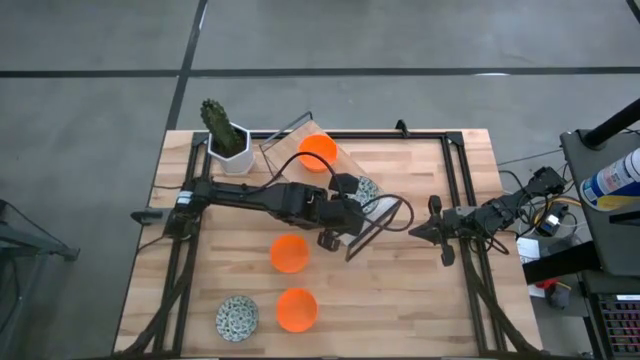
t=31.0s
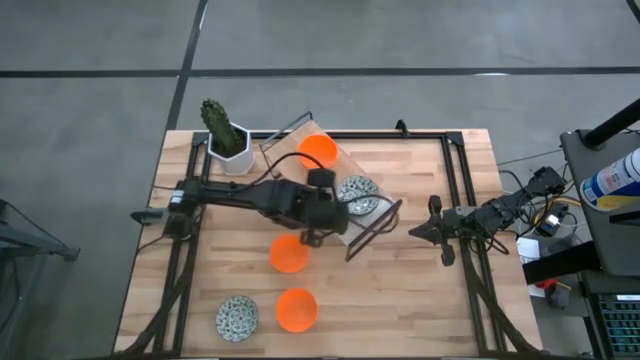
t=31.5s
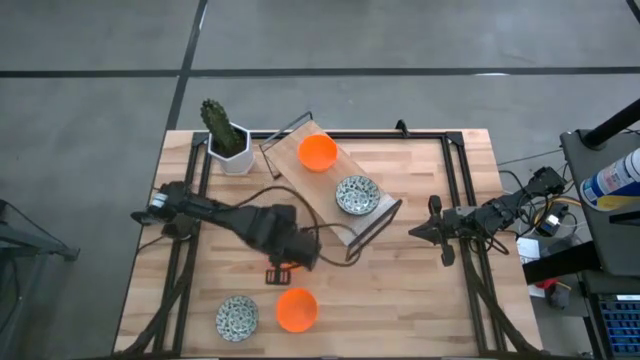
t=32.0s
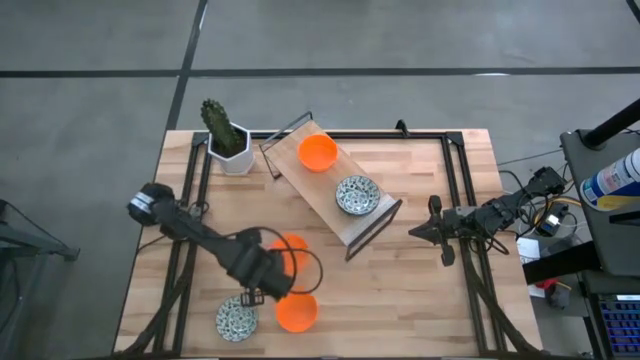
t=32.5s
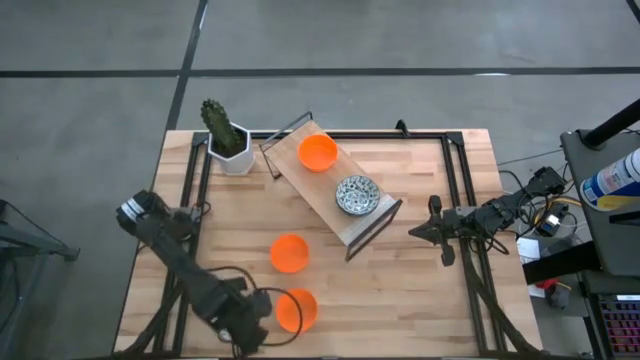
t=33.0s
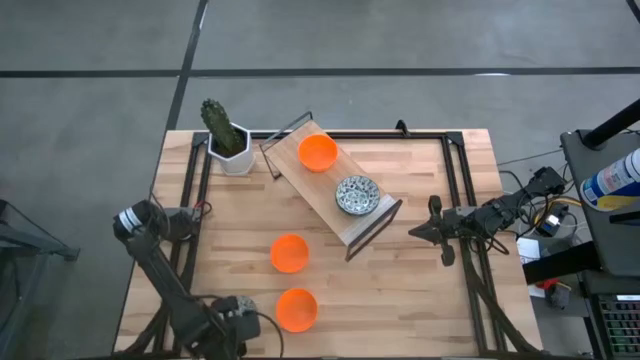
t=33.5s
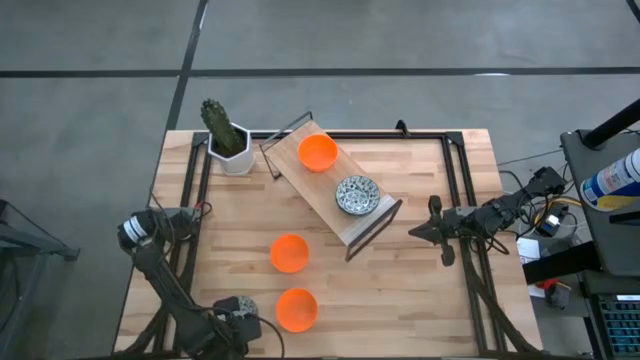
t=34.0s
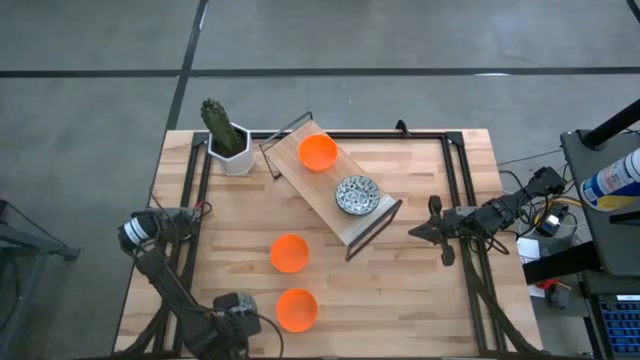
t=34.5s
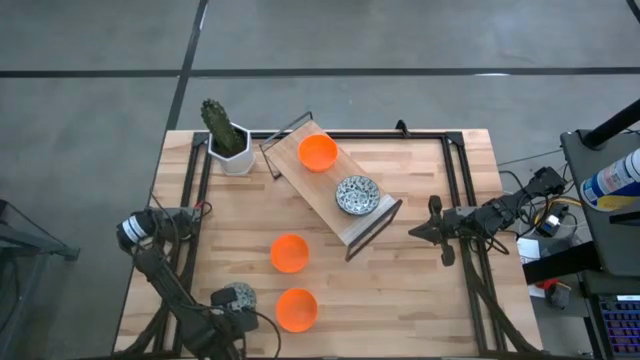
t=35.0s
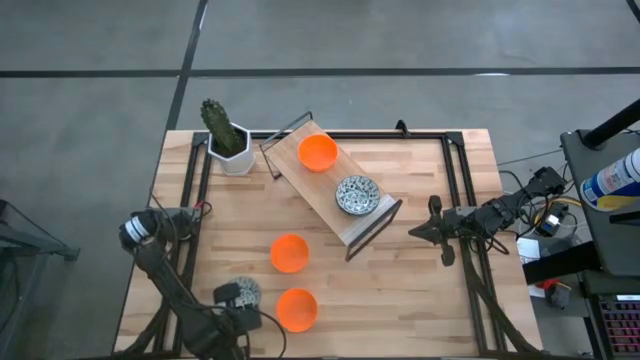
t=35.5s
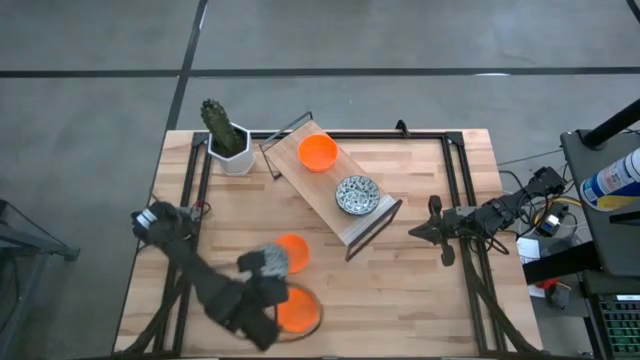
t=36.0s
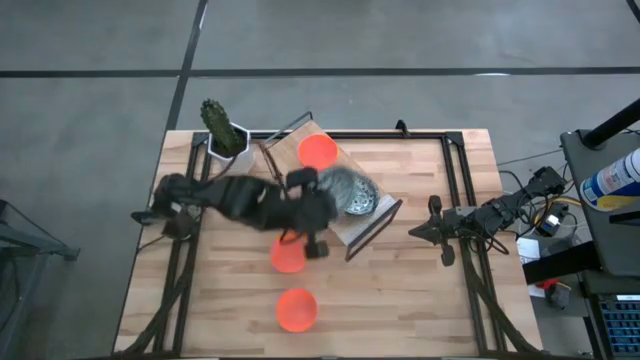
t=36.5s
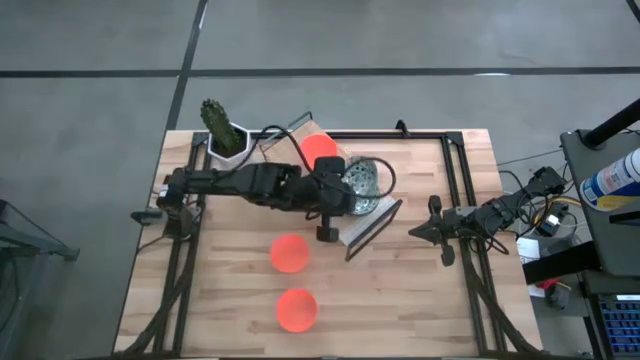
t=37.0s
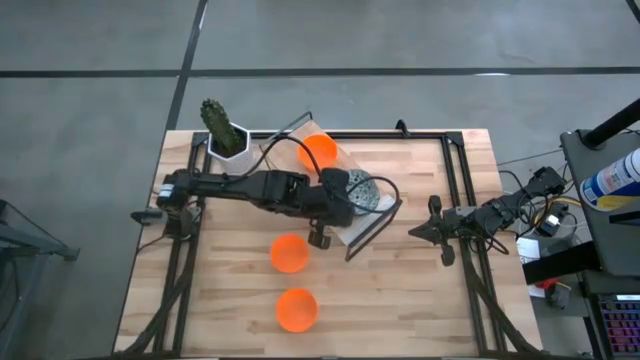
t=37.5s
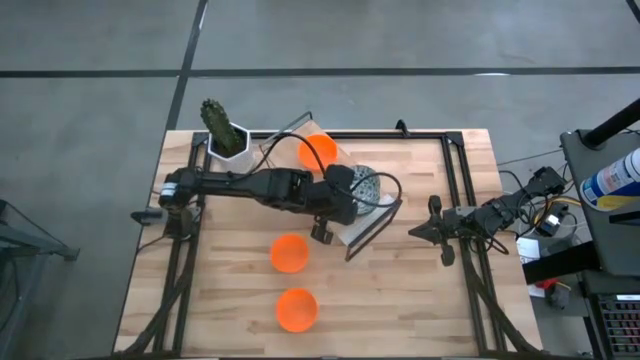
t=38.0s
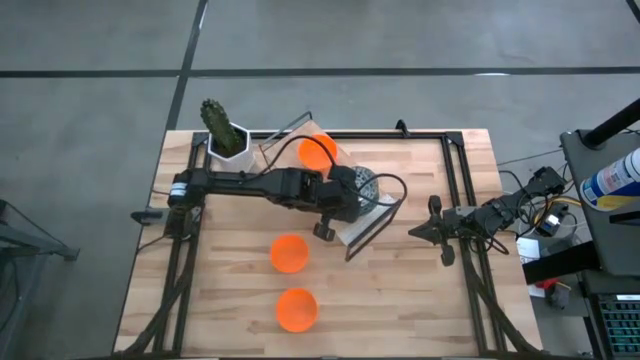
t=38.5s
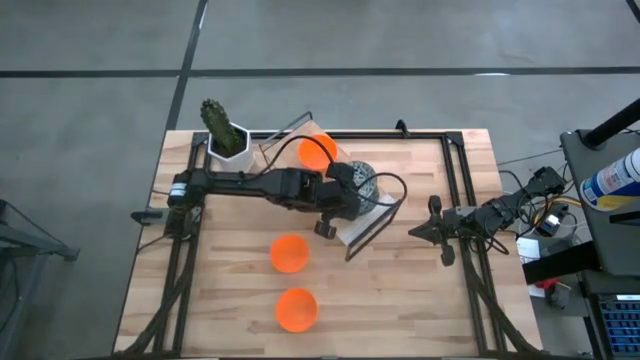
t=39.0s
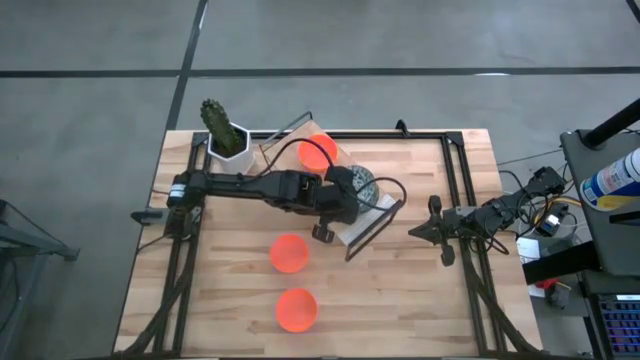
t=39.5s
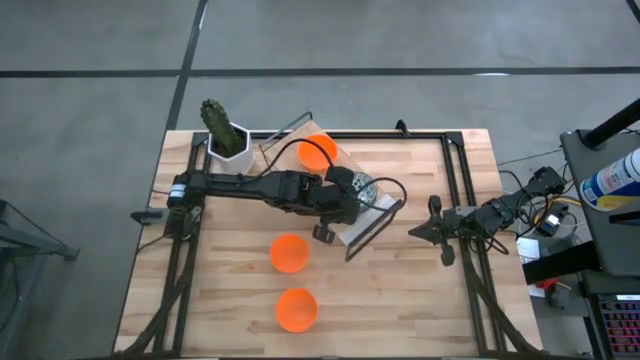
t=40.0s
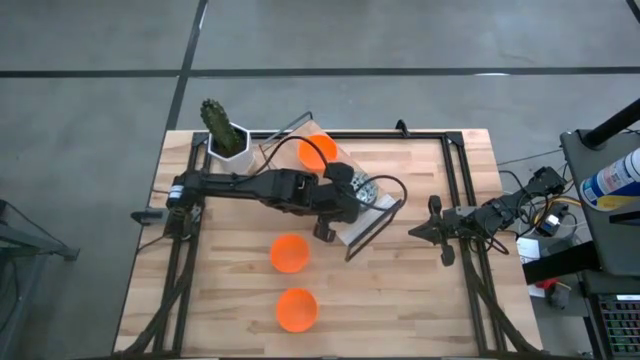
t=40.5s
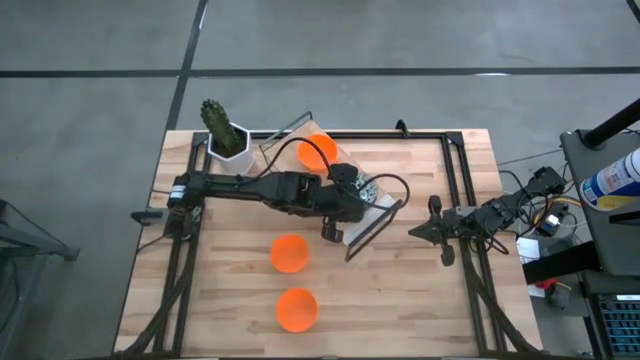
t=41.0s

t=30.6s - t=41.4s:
Task: Pick & Place Mini bowls
Stack the white patterned bowl on the white patterned bowl on the shelf

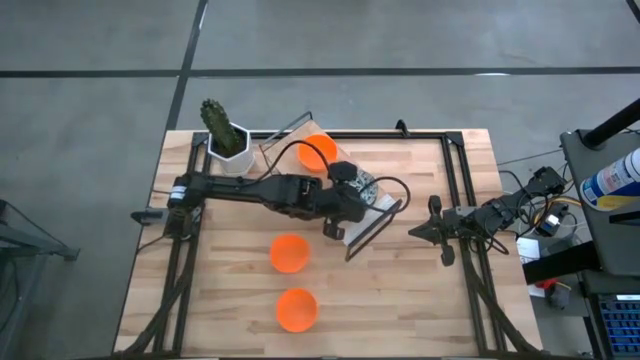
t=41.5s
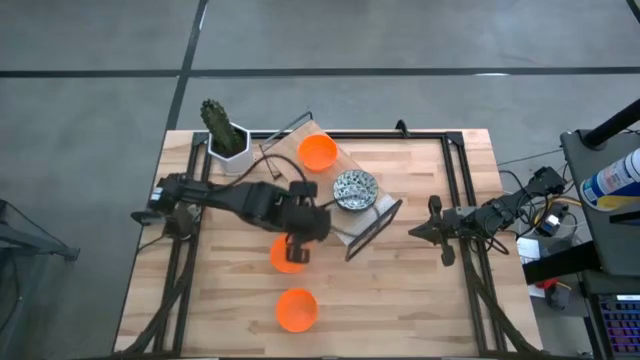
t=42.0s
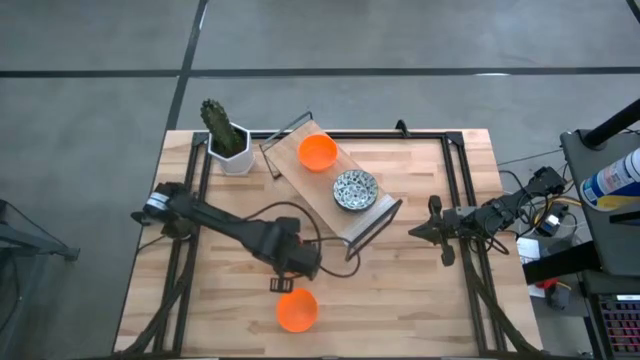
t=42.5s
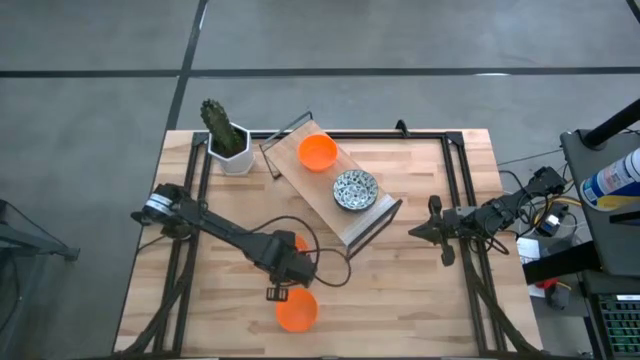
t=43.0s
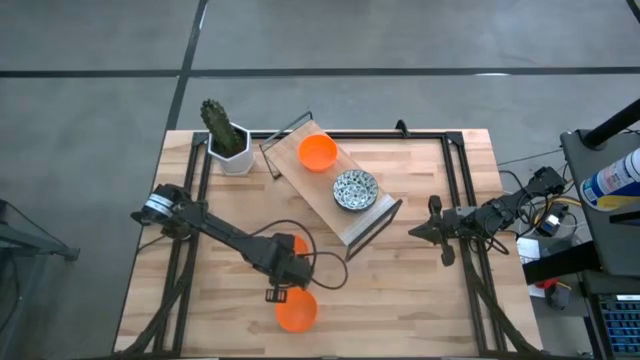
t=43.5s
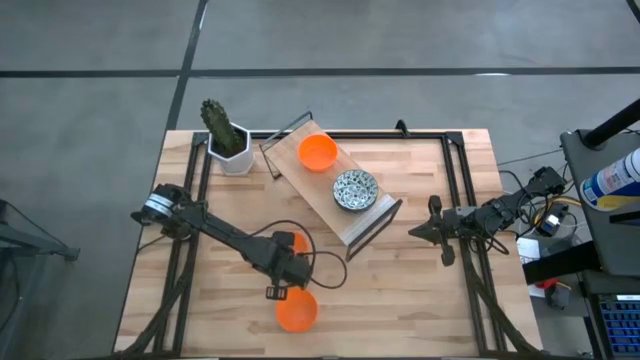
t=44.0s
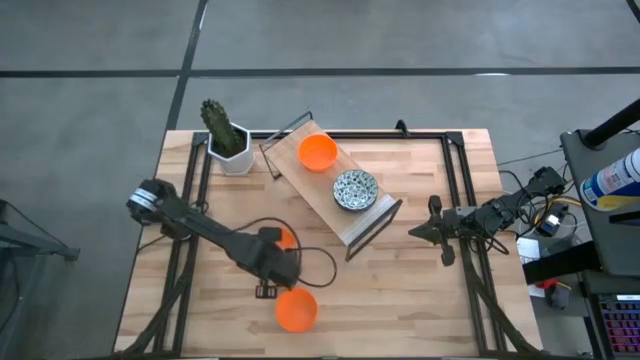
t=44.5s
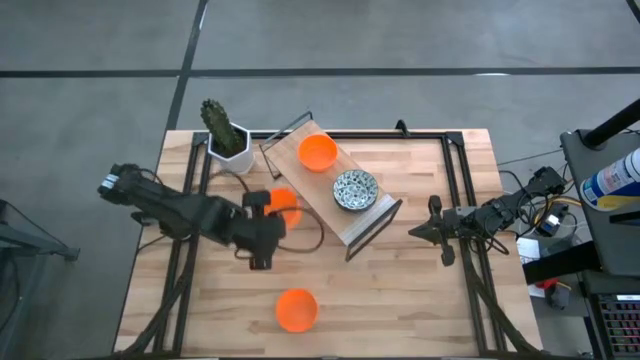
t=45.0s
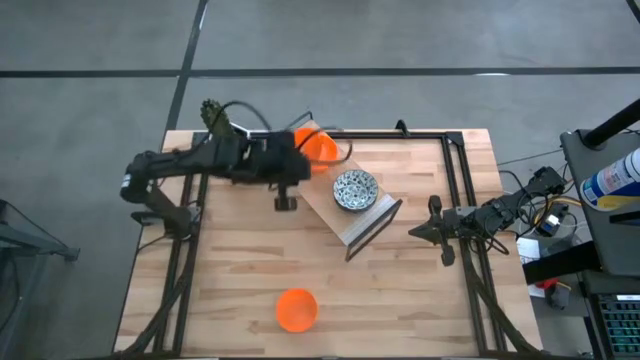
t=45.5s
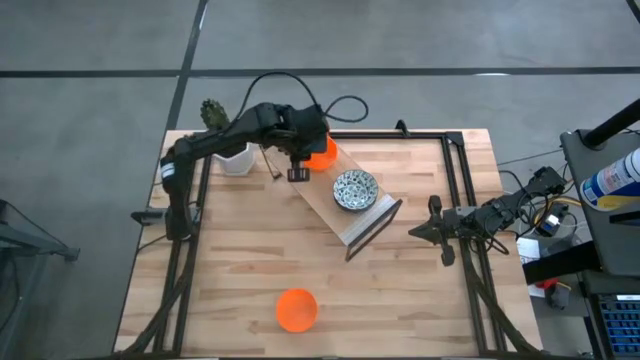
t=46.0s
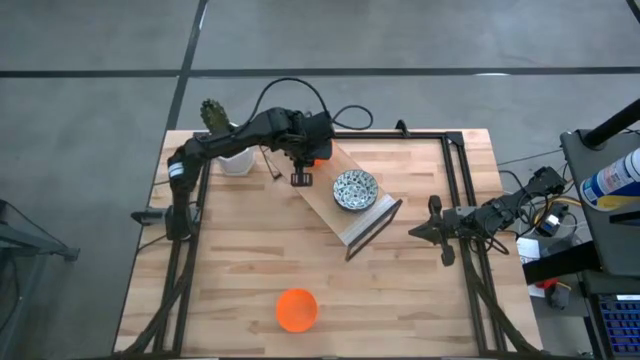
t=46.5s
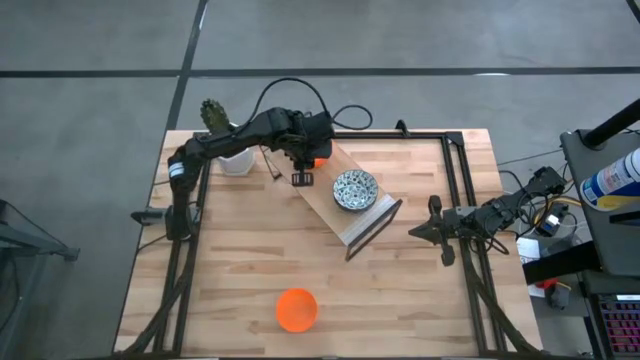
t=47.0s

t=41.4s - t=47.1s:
Stack the top orange bowl on the orange bowl on the shelf

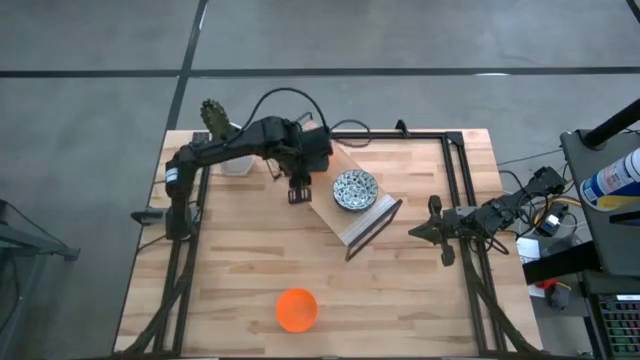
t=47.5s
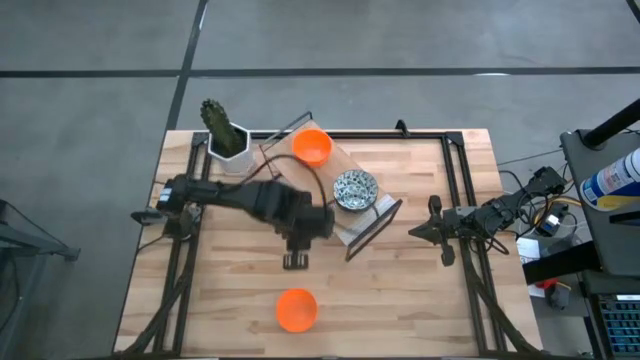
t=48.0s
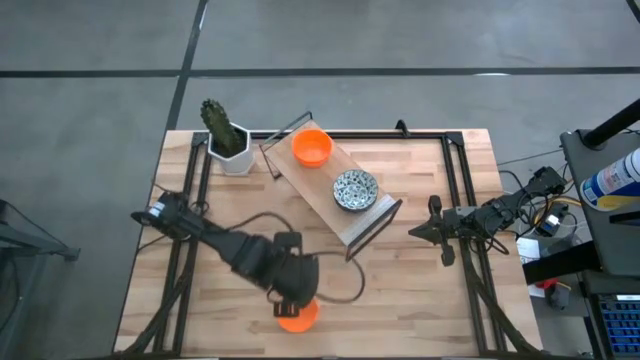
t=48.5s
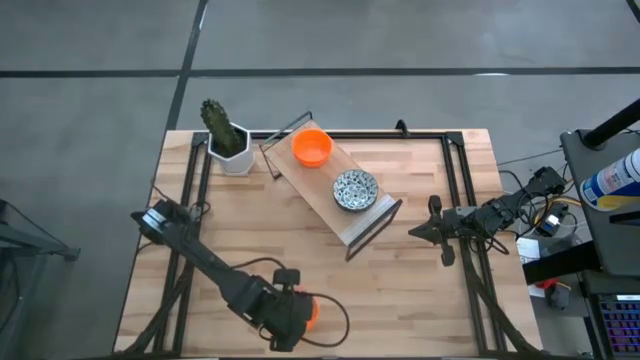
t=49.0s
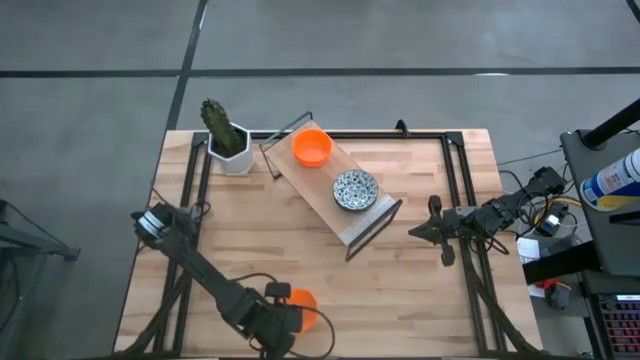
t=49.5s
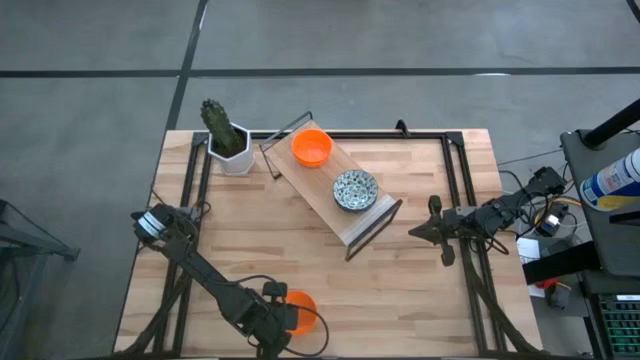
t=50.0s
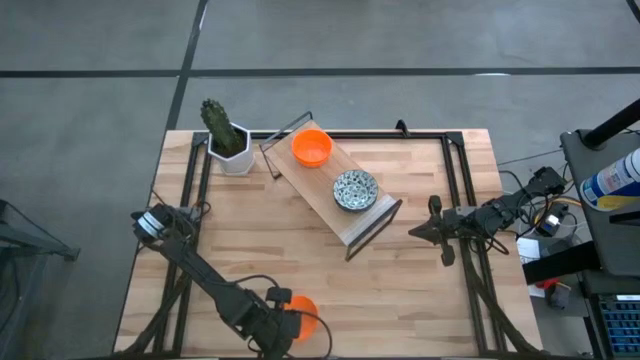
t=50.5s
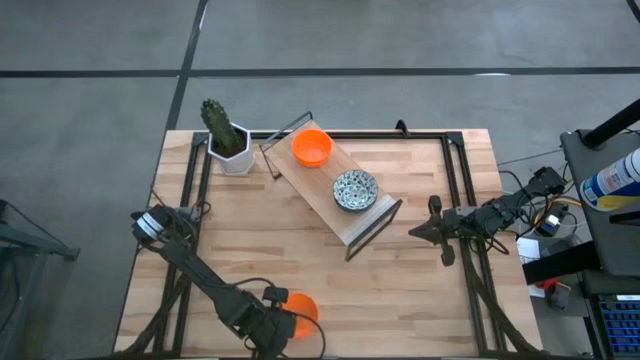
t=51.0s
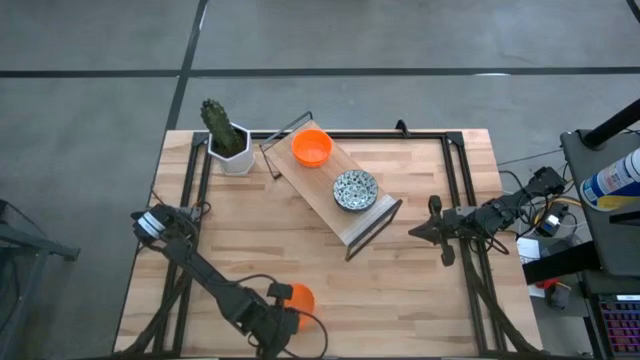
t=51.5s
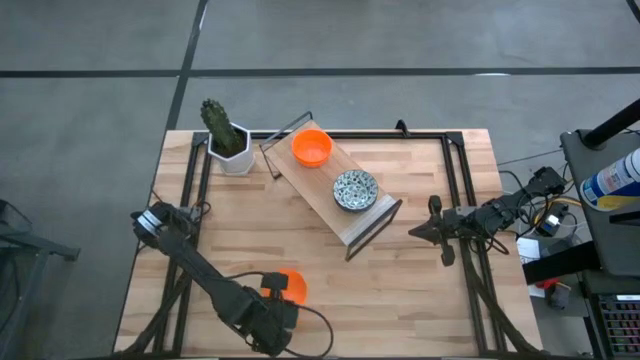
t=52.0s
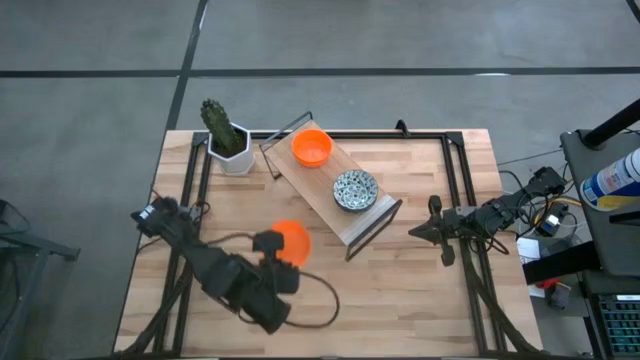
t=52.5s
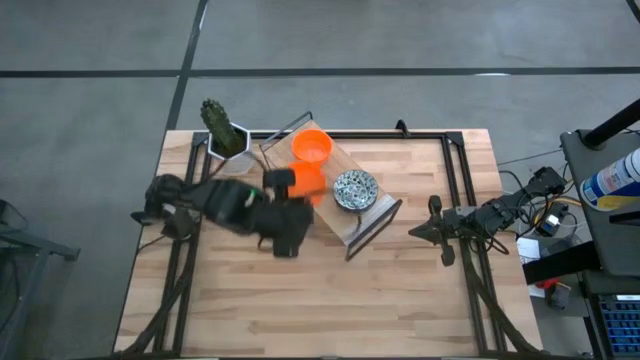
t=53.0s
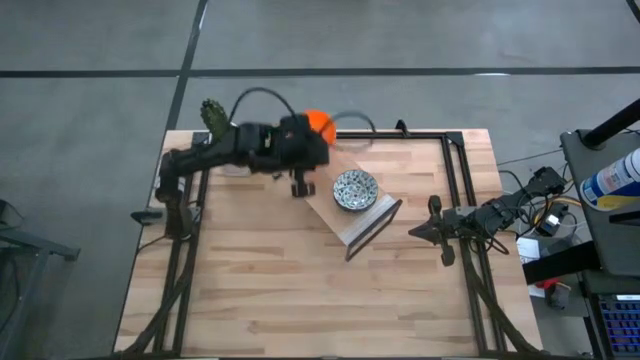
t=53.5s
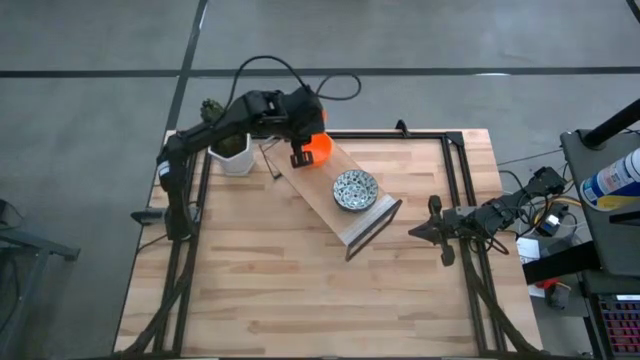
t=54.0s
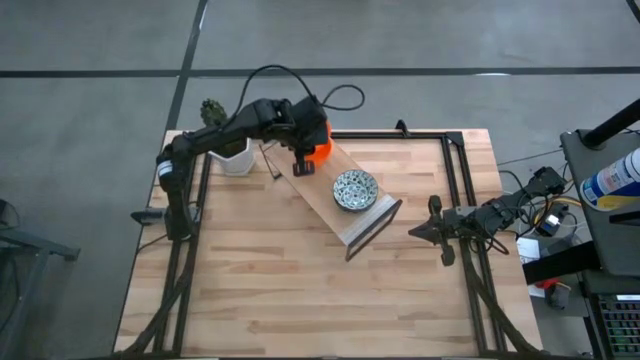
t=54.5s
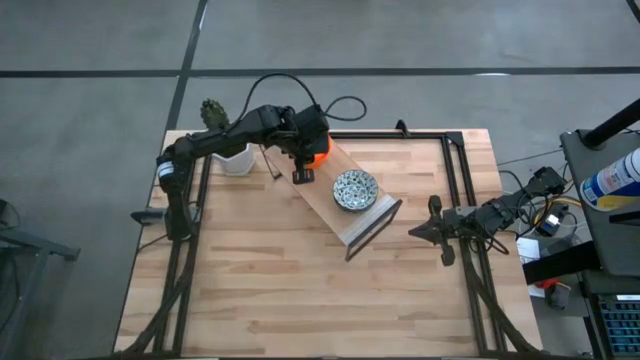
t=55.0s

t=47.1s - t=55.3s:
Stack the orange bowl on the orange bowl on the shelf
